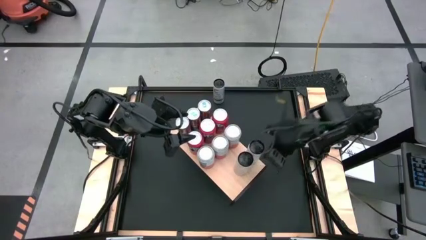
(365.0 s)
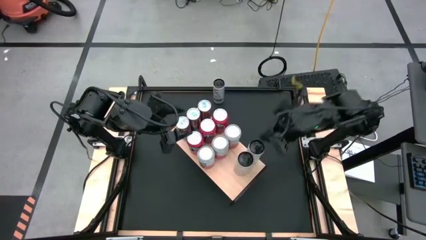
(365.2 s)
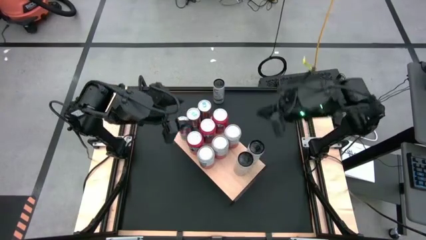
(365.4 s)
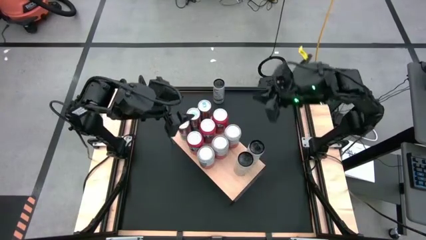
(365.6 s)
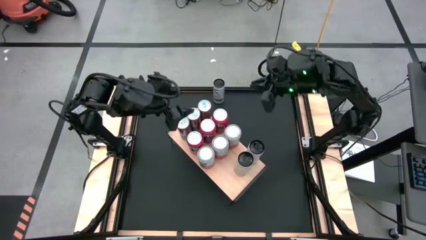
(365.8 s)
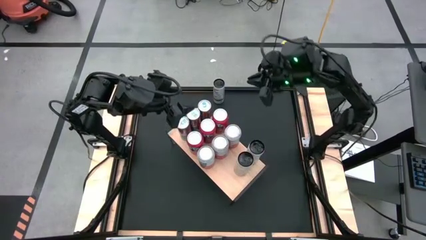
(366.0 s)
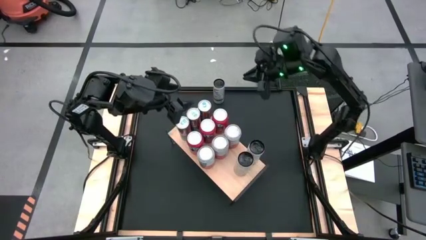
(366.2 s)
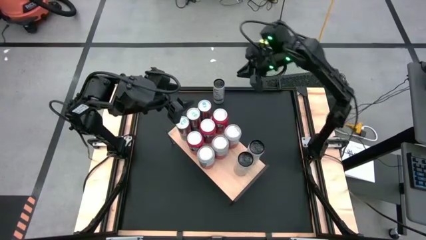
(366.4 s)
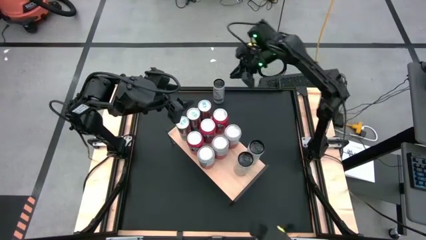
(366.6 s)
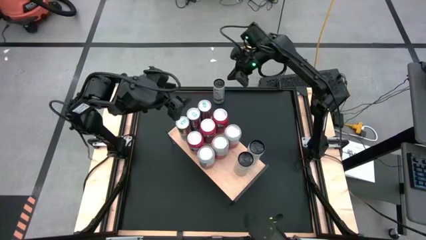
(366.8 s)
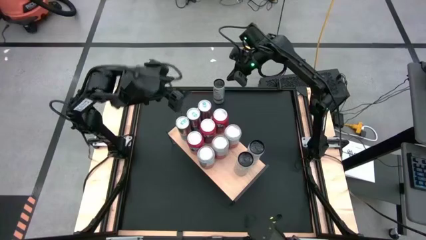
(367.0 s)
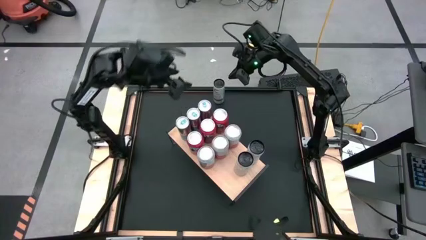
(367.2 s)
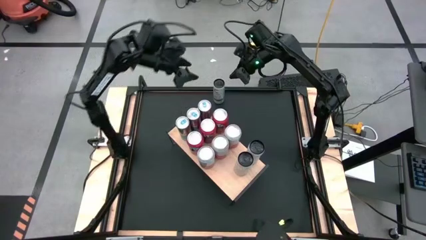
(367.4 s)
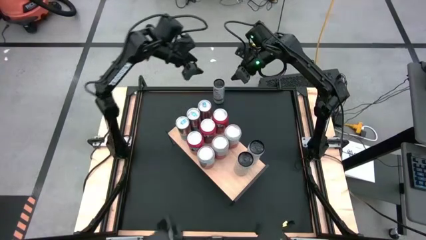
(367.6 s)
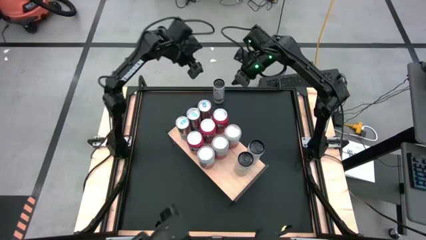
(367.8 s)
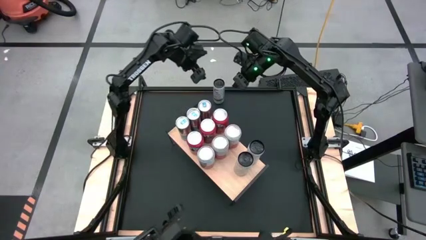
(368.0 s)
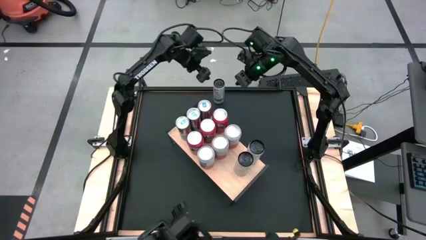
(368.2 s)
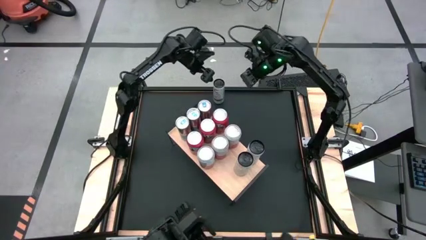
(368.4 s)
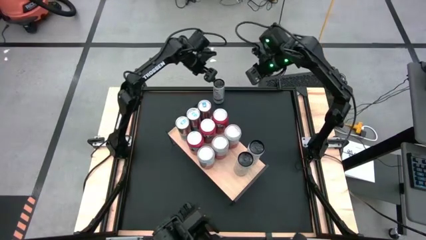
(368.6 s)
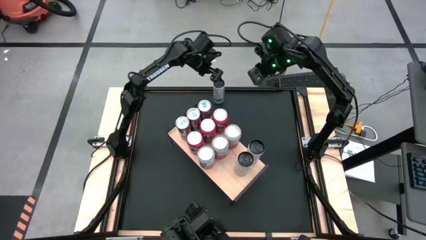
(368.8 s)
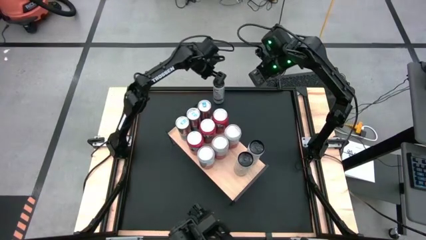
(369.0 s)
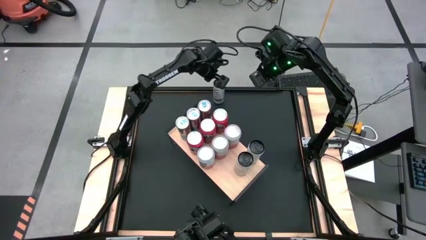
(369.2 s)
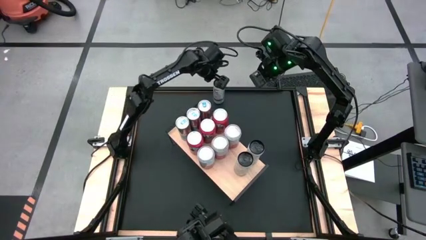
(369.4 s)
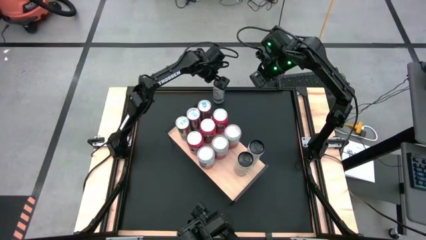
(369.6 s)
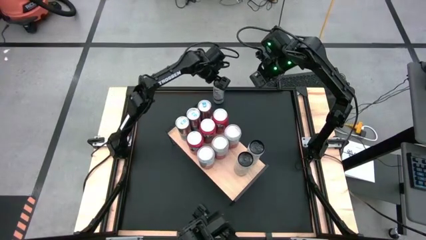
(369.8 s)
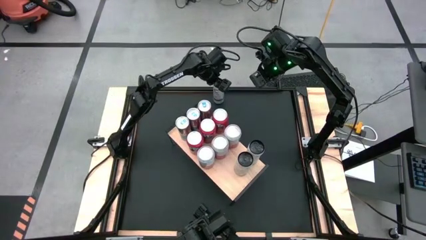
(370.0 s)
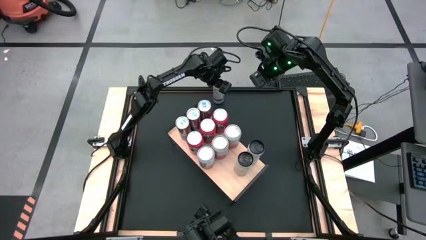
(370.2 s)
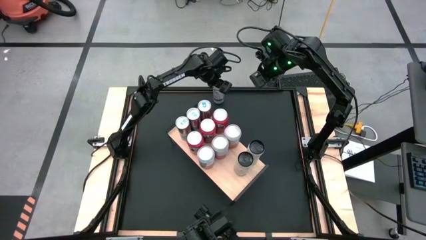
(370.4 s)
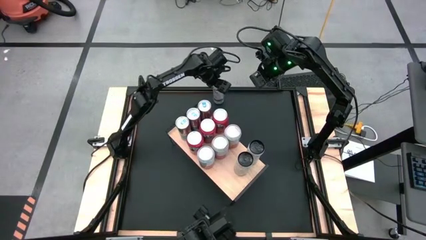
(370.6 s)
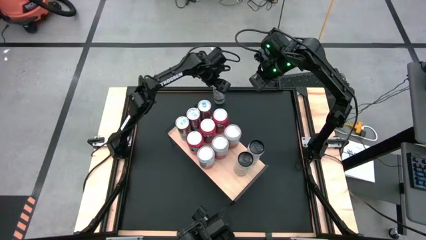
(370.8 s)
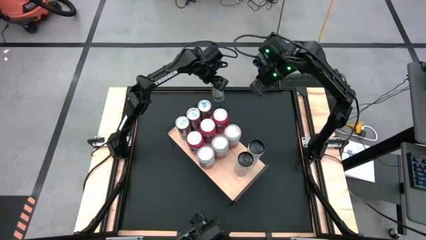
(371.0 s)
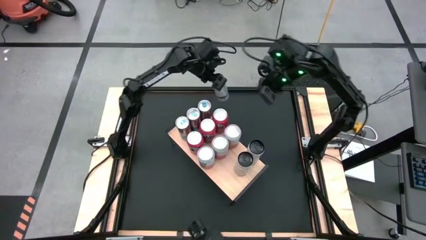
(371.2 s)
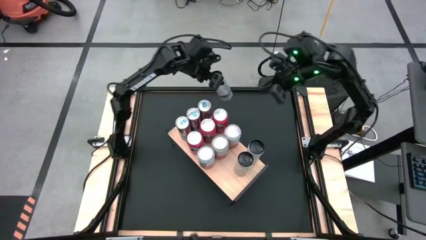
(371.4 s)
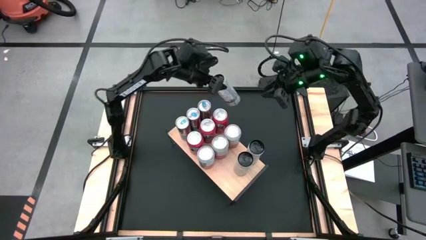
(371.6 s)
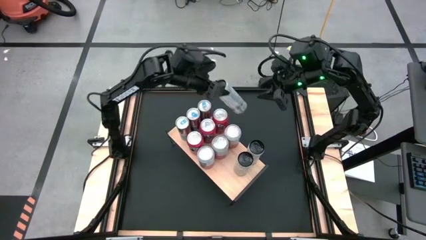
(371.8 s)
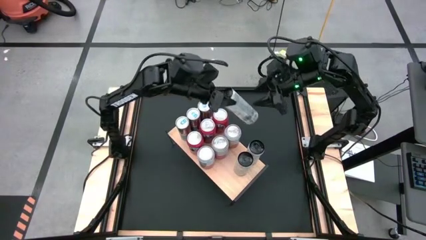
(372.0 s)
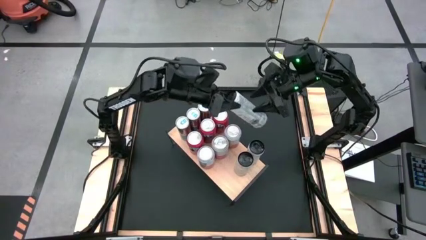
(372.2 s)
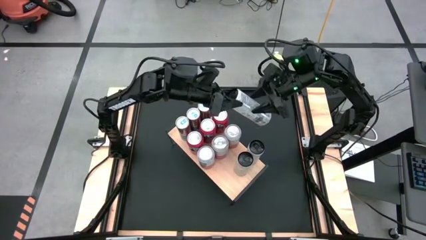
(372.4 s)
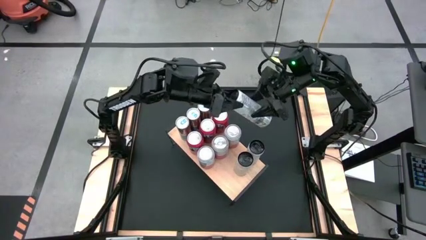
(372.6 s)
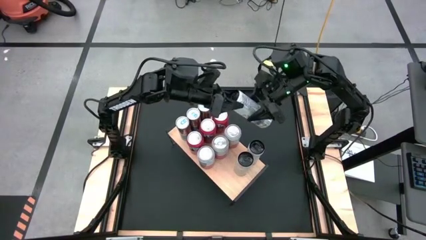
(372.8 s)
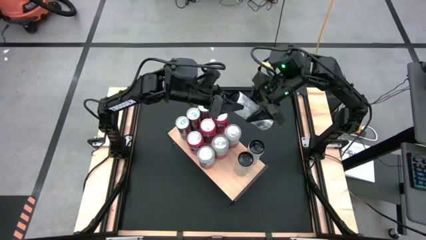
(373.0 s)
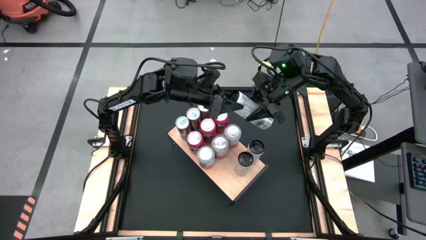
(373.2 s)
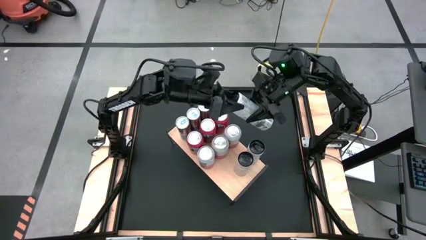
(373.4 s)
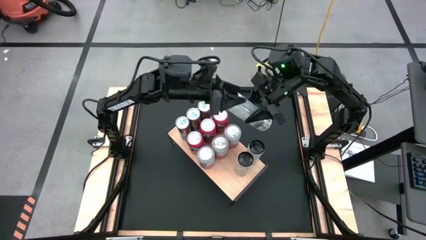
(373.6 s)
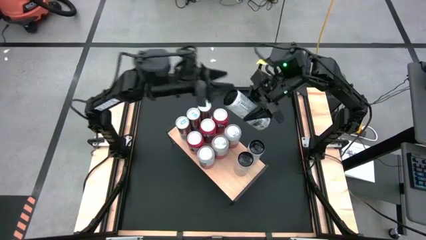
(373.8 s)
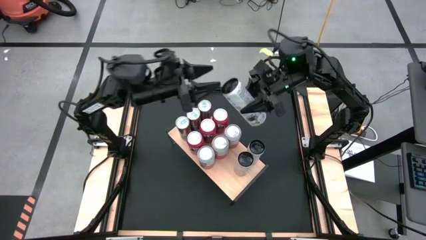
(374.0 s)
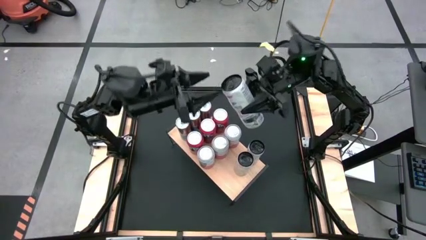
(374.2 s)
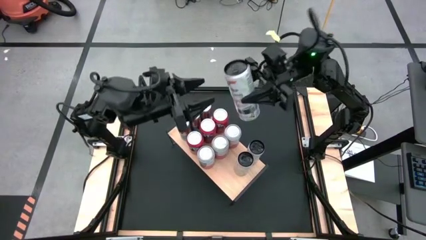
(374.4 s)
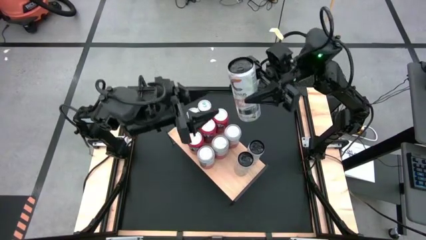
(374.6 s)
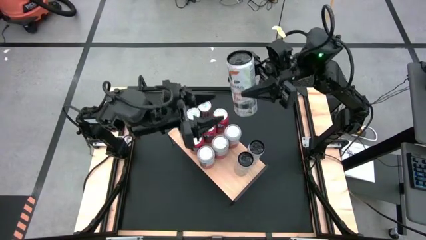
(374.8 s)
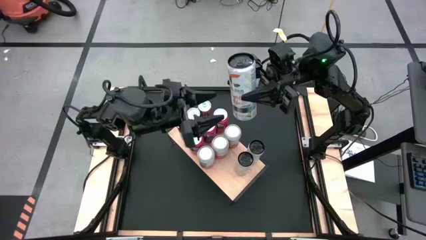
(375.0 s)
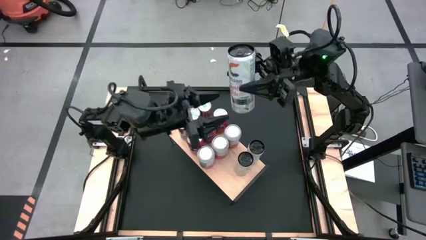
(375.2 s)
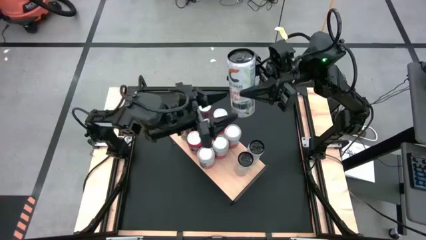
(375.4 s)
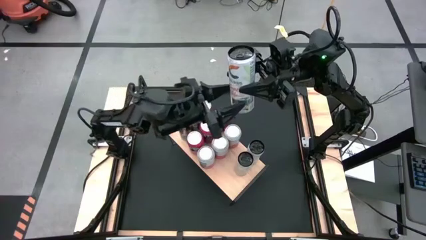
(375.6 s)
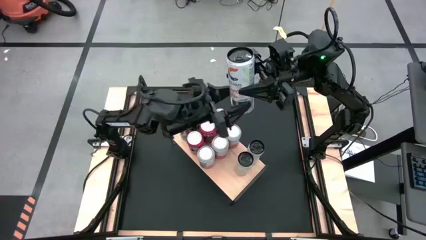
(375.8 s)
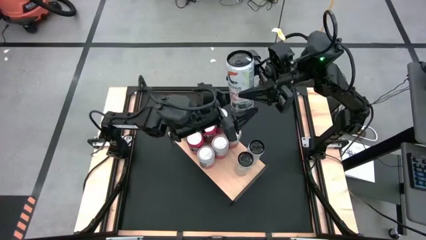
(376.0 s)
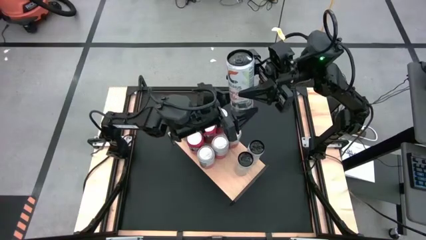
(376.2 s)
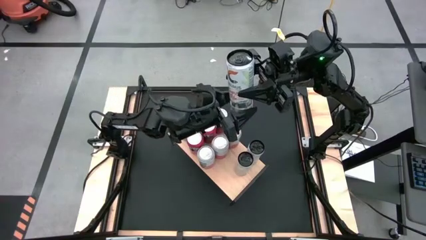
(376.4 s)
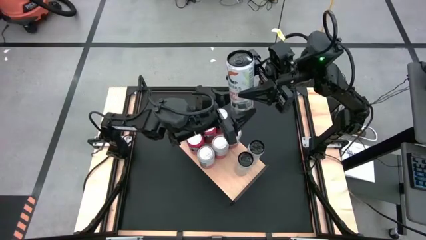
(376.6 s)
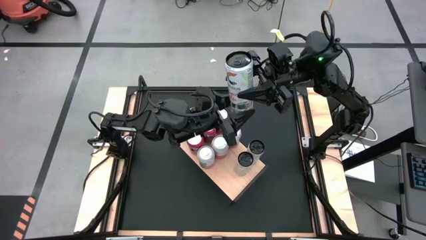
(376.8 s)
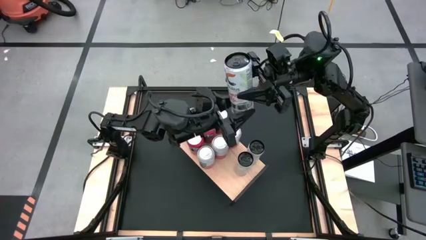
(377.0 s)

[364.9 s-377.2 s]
Task: Place canned beverage on shelf
Put the white soda can on the shelf aligned with the other white soda cans

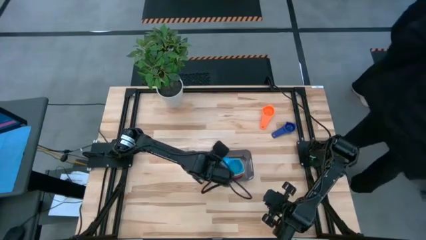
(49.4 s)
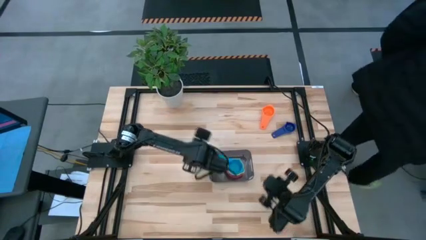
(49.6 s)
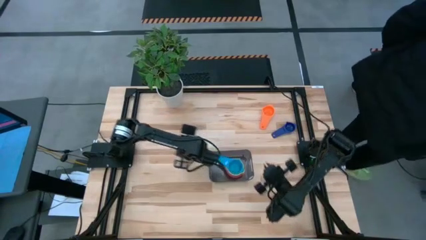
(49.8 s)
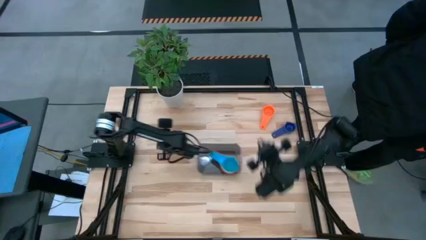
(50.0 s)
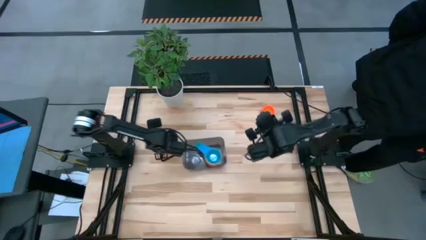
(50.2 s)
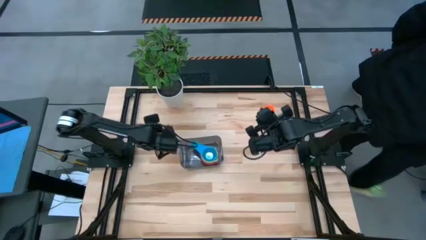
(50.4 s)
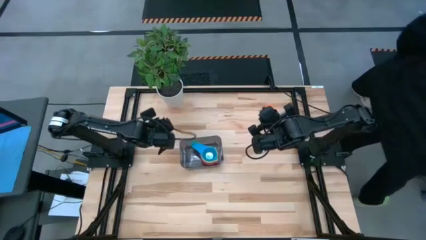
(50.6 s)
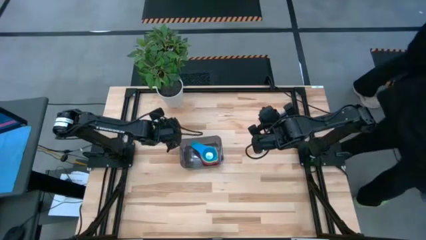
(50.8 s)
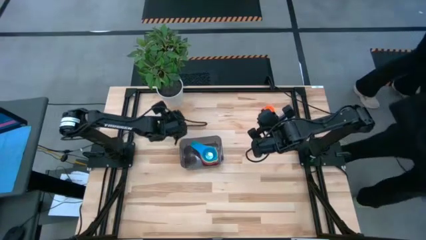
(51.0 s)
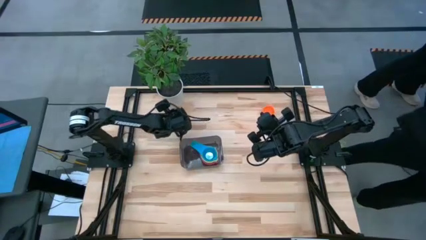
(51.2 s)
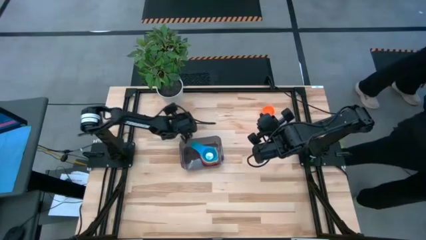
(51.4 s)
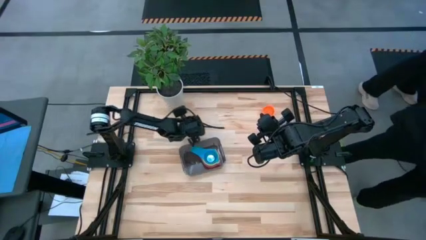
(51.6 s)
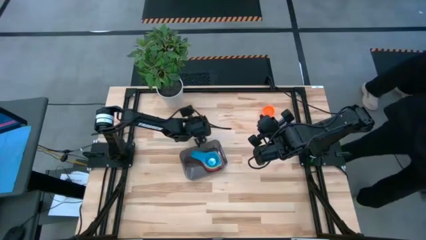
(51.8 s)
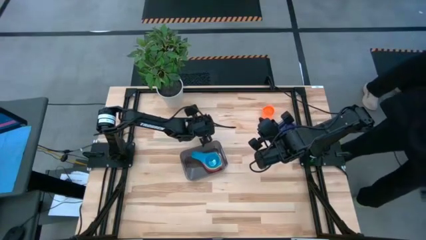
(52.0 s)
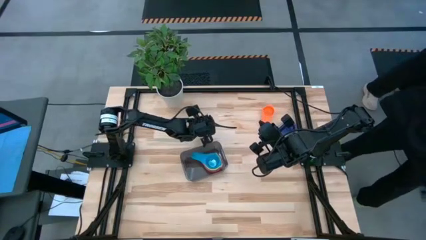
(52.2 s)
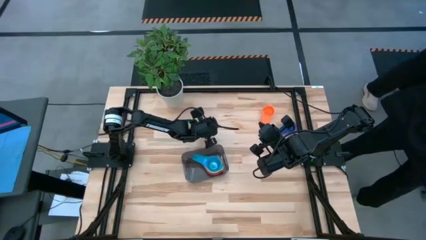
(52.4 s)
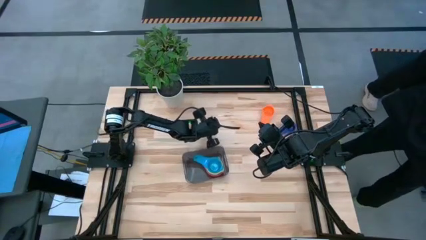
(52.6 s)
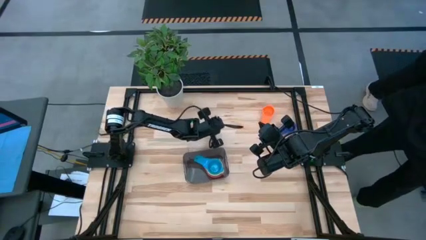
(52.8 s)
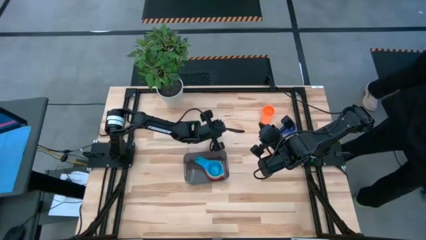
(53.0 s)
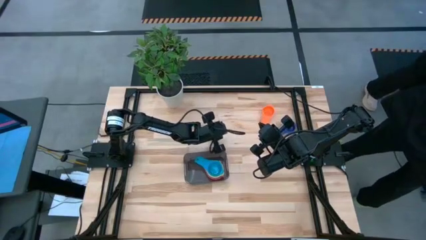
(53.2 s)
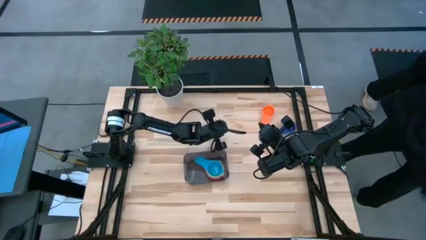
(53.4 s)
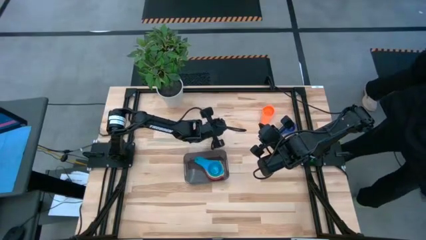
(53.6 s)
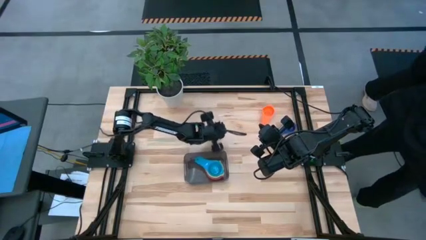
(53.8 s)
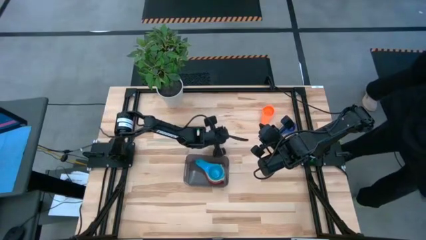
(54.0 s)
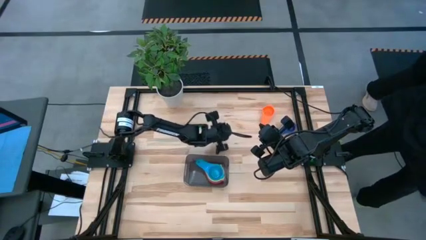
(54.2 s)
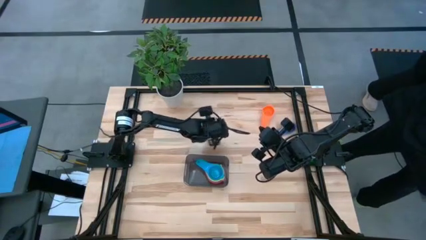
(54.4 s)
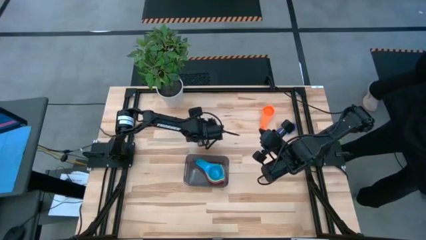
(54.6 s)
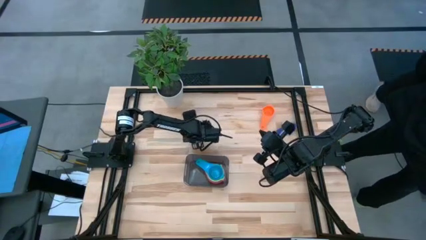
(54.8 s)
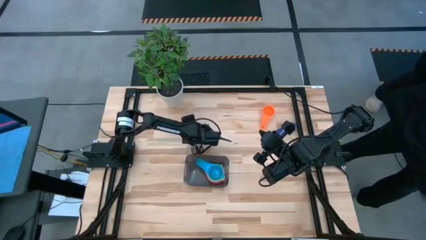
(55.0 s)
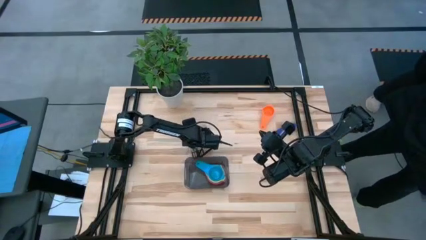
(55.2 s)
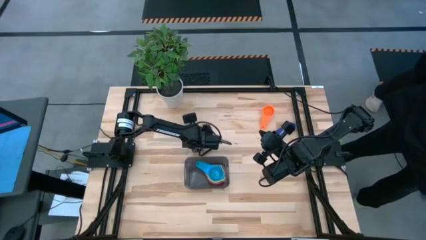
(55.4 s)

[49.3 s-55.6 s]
Task: Nest measuring cups in basket
Adjust the black bin
